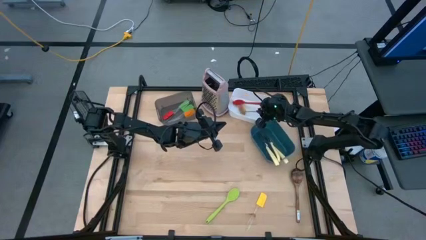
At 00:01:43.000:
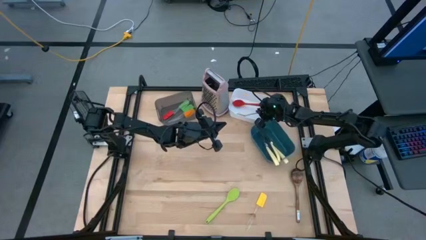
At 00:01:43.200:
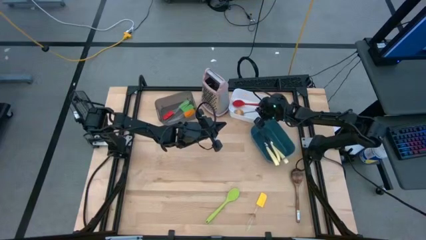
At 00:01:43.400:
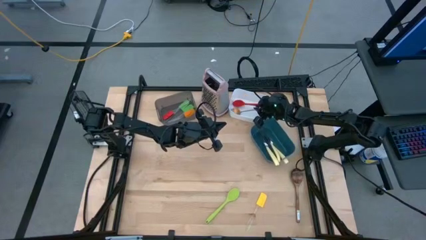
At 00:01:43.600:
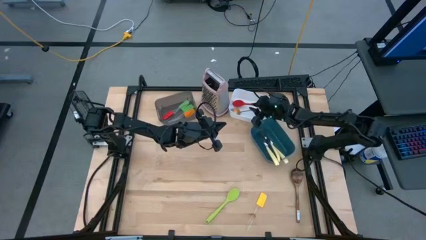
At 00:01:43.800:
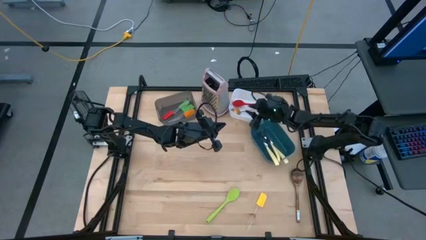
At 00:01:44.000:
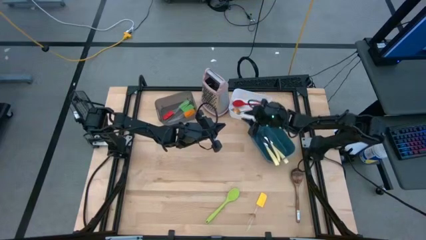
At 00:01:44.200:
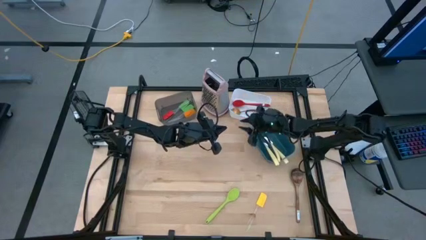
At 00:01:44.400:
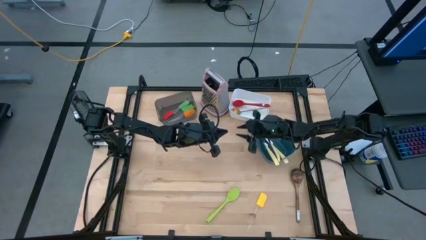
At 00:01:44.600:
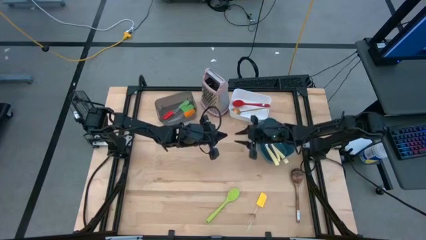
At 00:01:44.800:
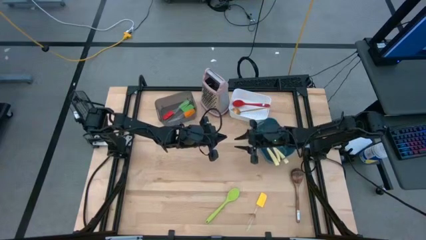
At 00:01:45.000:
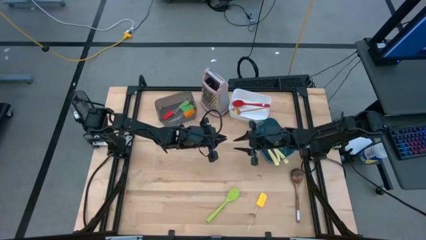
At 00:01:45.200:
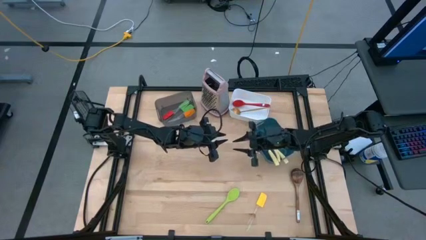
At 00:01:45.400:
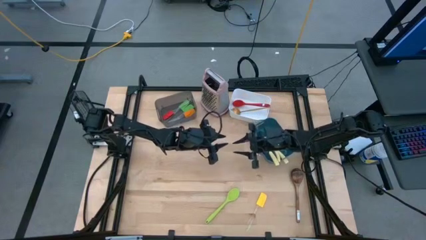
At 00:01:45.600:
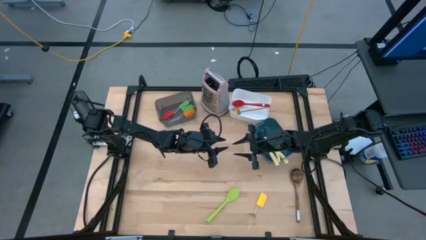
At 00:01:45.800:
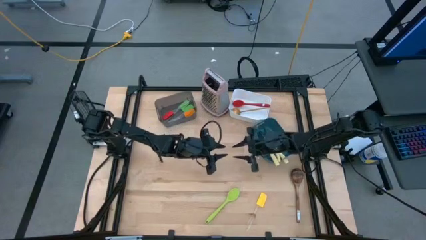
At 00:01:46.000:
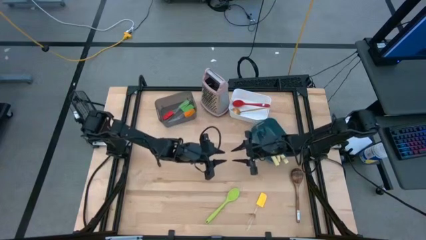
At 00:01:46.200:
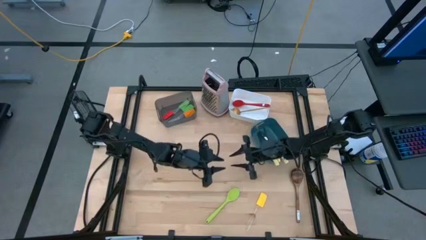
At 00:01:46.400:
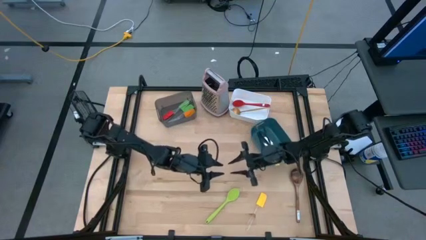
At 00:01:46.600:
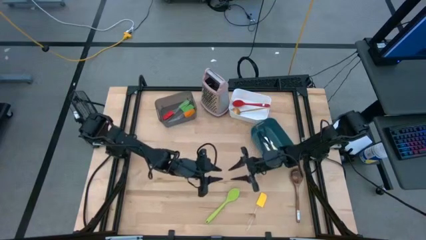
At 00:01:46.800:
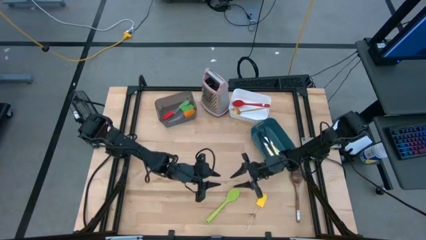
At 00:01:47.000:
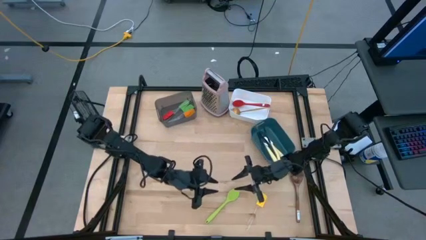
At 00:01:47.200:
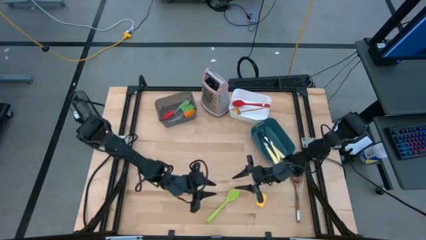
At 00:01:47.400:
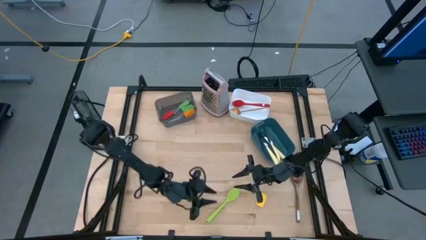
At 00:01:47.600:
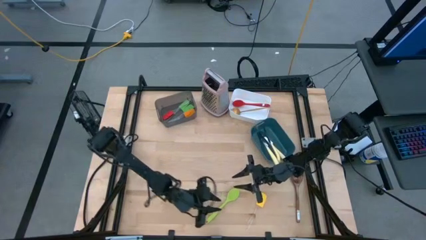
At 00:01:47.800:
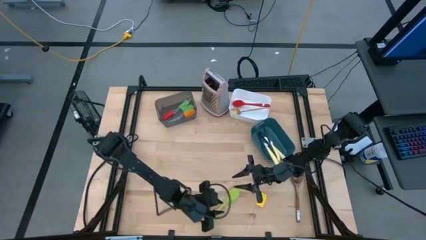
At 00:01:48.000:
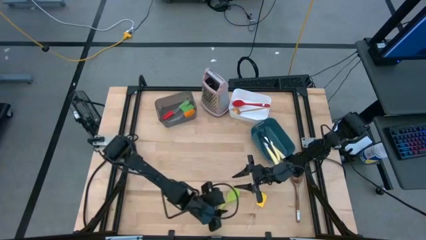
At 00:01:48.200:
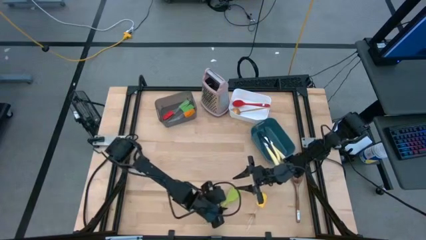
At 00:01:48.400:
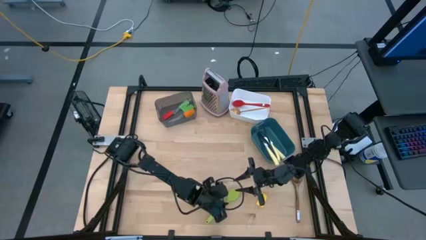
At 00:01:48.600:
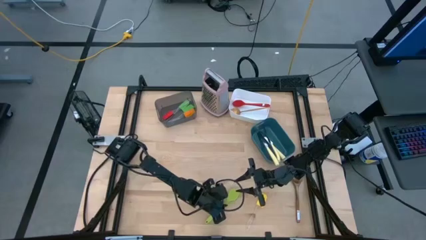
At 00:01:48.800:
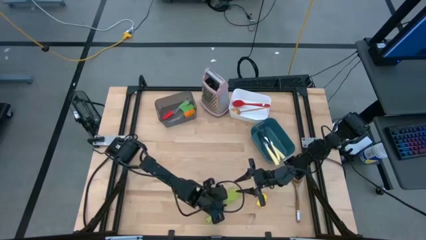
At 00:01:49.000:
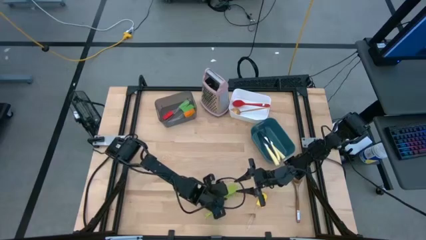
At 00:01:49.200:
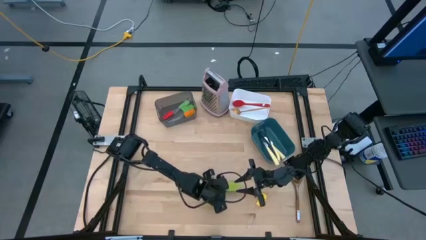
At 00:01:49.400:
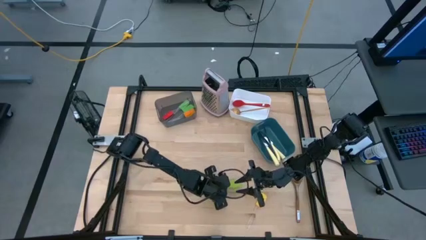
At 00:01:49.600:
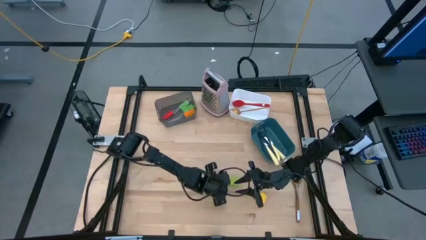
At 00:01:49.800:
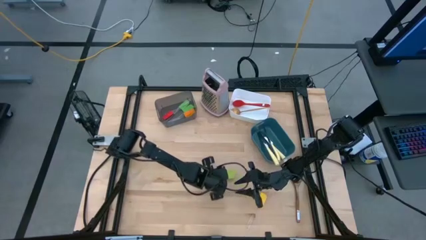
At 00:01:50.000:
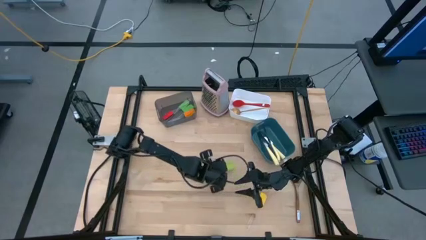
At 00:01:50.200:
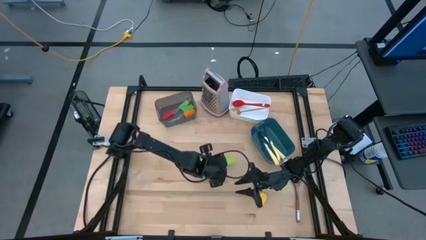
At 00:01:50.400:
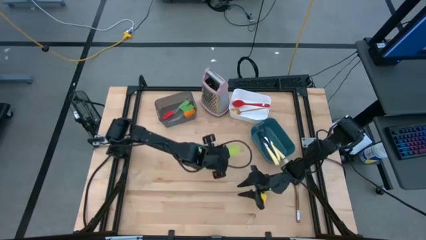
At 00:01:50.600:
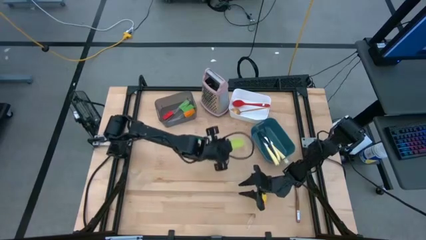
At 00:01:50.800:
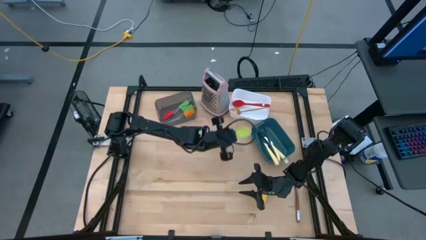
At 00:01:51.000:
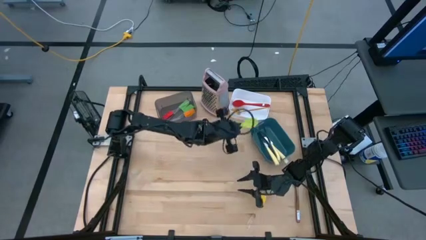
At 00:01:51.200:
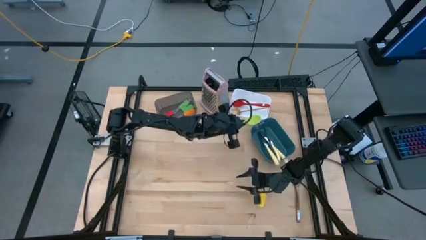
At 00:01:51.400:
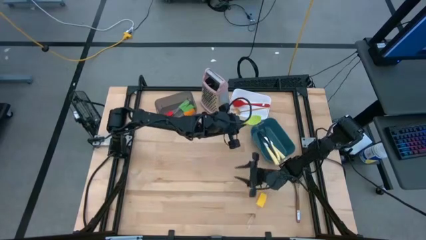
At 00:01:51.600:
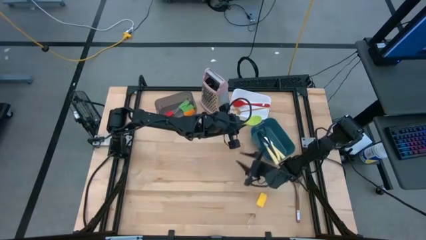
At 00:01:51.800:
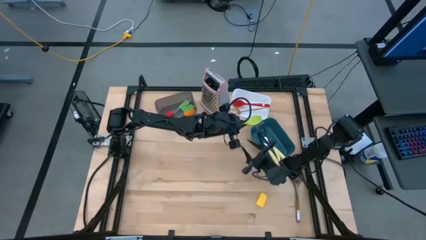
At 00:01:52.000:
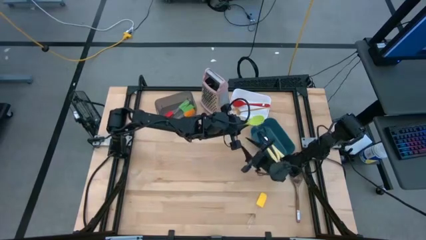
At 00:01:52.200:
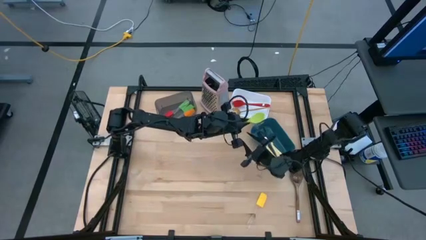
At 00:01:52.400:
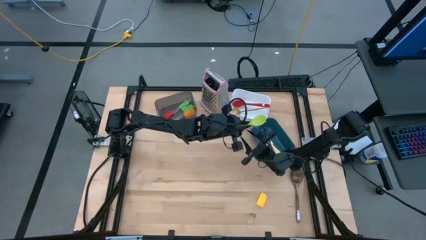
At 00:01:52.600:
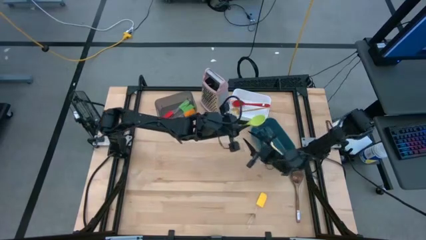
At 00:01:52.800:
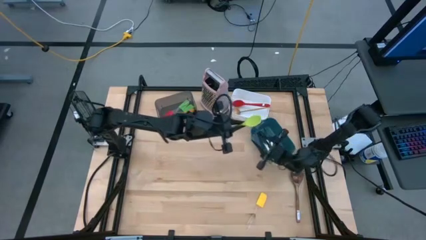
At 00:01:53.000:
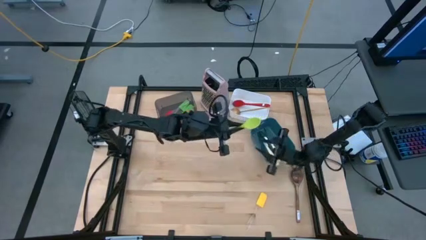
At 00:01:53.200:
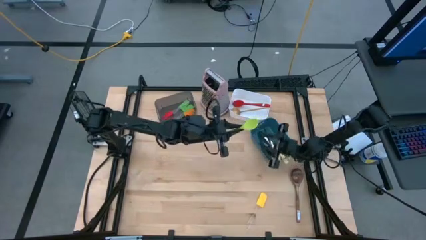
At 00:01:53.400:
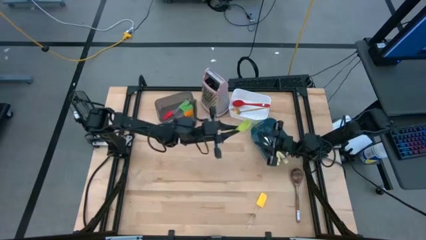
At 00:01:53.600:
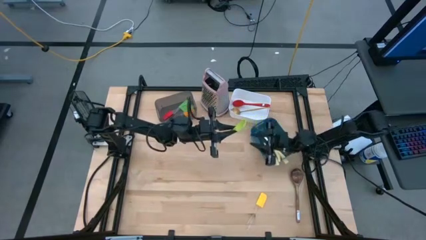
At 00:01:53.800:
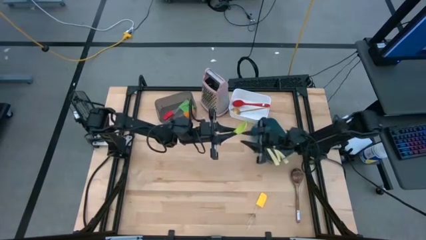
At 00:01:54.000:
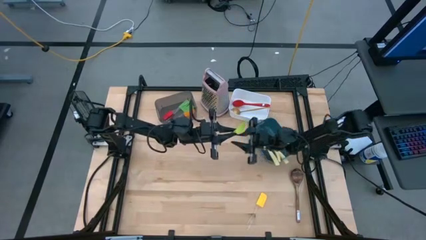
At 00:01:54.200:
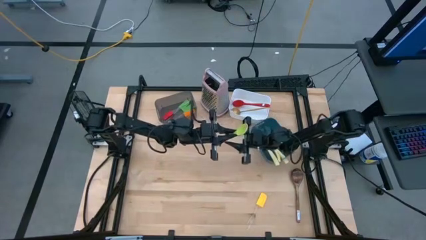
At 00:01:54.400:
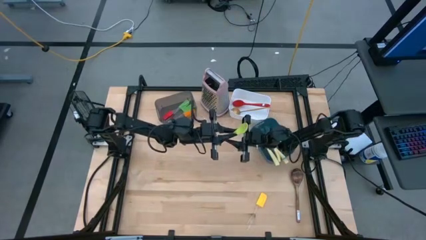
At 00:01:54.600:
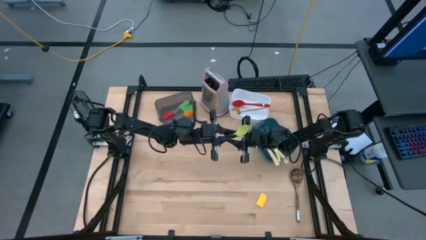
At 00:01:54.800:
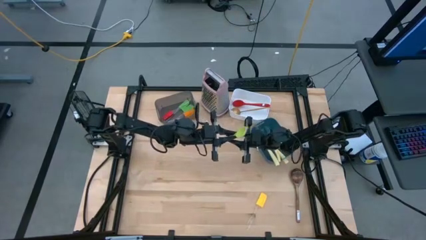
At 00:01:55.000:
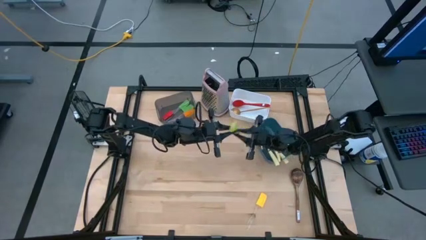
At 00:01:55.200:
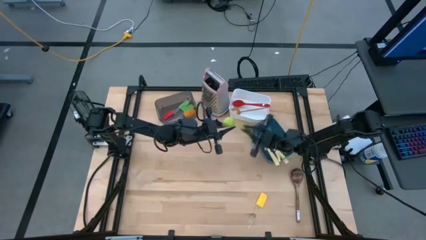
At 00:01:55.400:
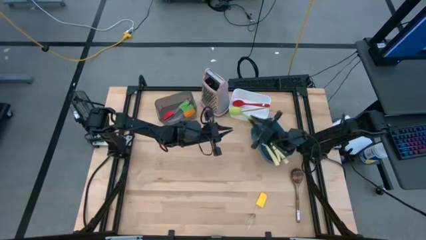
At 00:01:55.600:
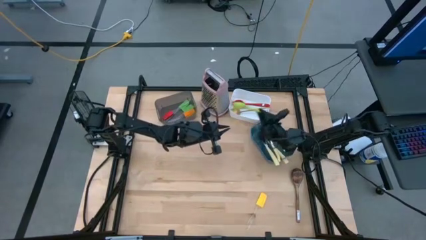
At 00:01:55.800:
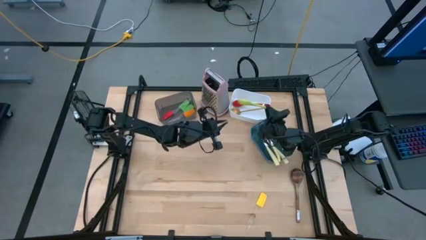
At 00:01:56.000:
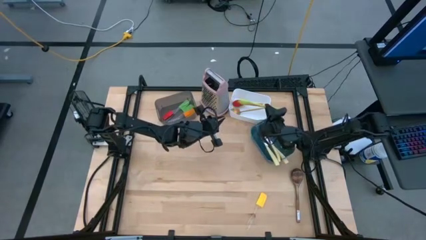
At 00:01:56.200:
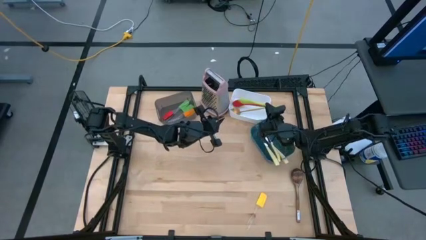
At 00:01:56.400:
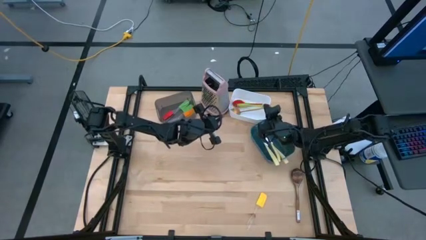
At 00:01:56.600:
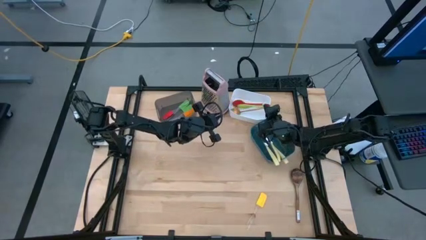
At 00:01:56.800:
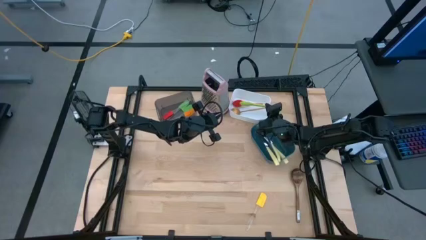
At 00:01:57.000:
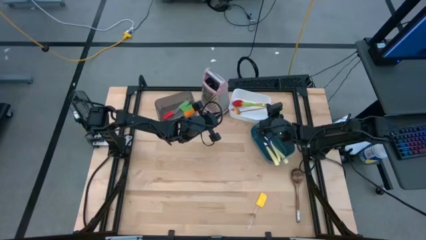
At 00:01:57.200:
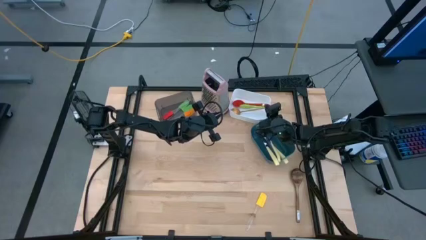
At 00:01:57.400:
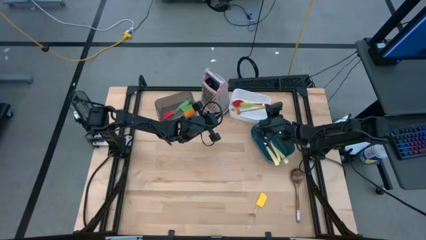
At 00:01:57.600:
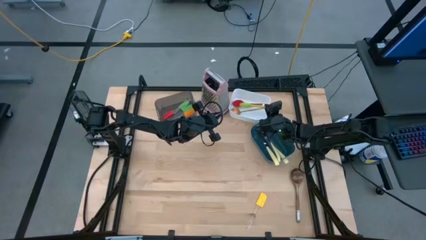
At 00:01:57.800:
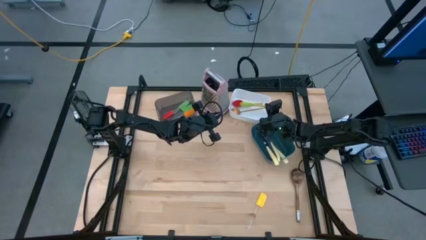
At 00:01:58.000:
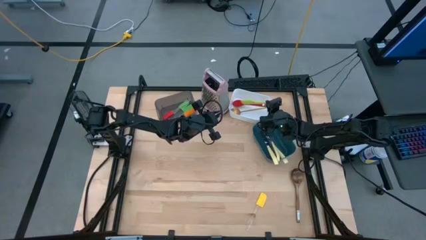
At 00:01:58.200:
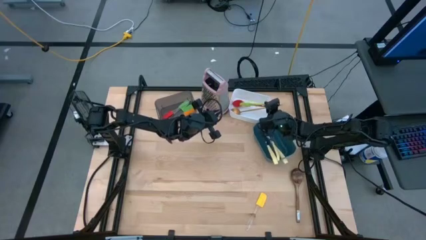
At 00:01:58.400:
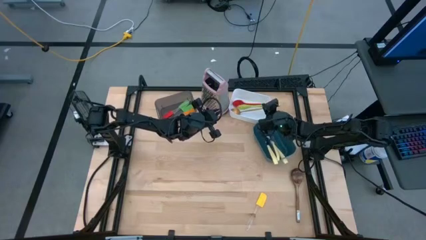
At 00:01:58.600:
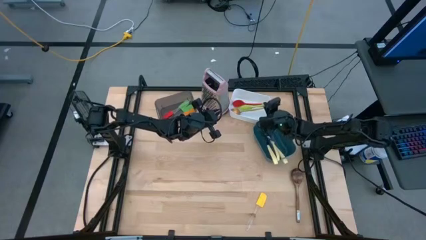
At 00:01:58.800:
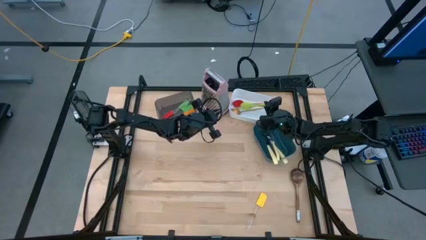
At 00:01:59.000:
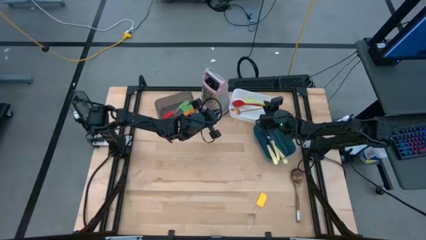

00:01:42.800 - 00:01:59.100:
Task: Pick & Place Kitchen Items
Put the green serving spoon into the white bin
